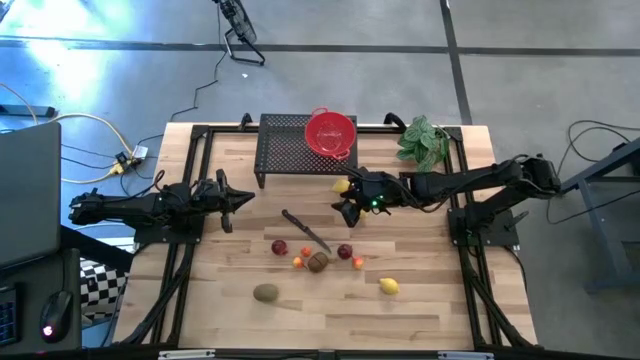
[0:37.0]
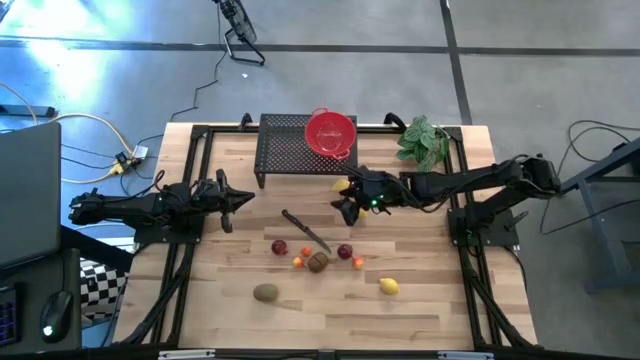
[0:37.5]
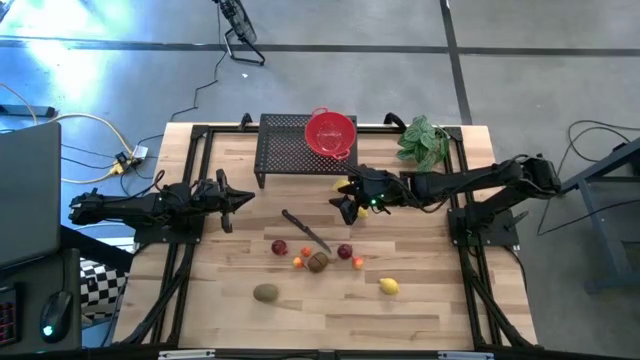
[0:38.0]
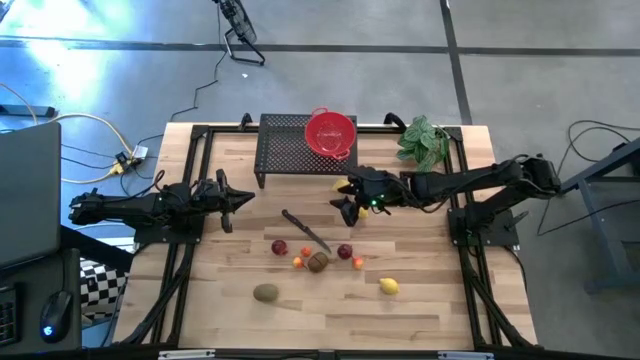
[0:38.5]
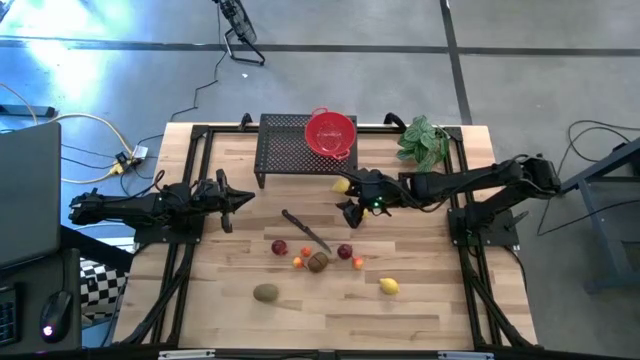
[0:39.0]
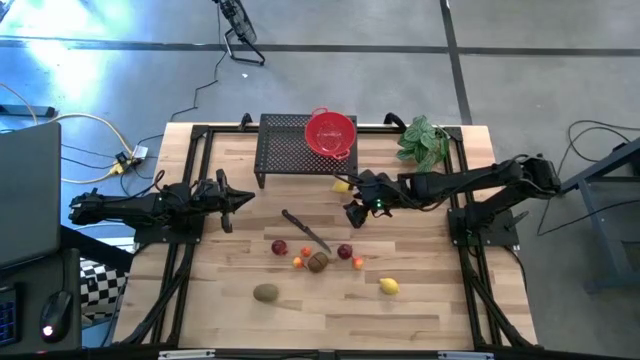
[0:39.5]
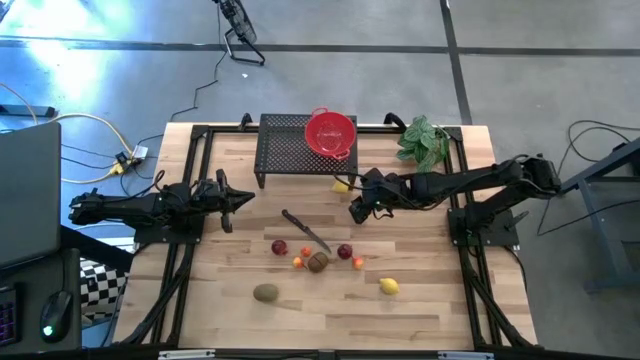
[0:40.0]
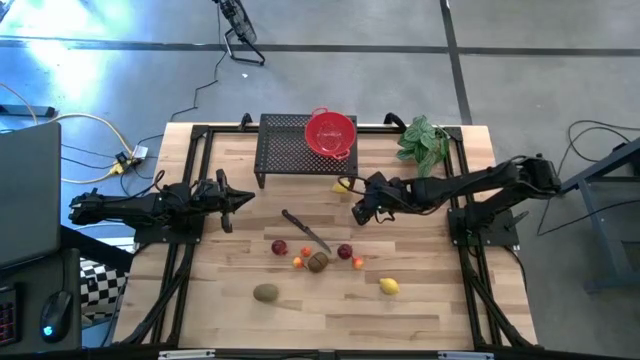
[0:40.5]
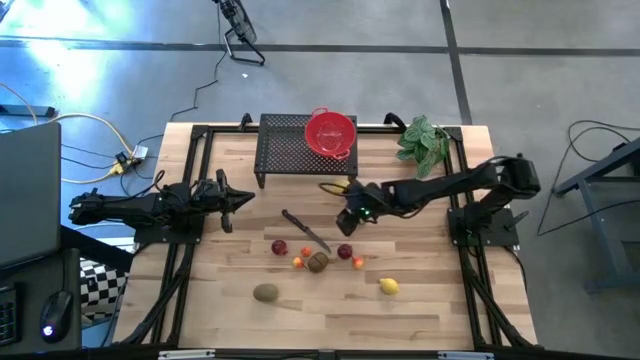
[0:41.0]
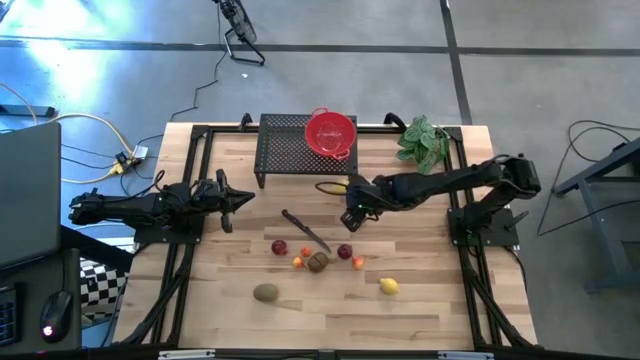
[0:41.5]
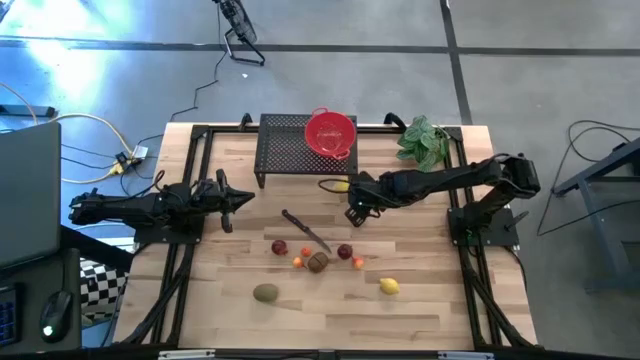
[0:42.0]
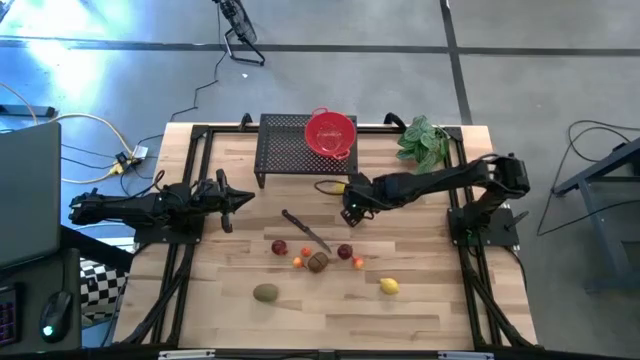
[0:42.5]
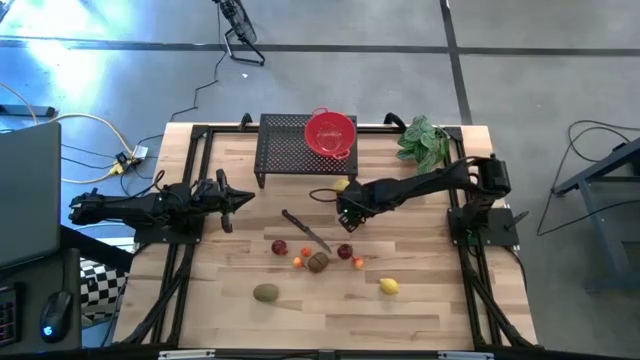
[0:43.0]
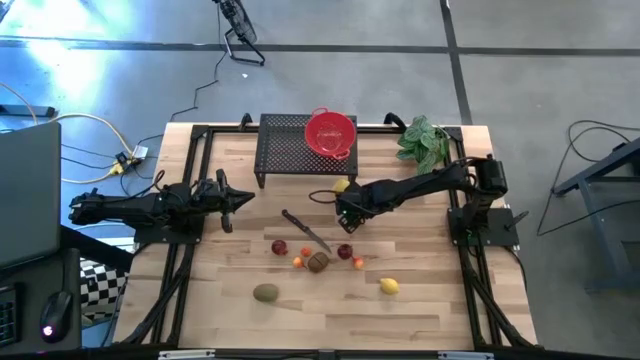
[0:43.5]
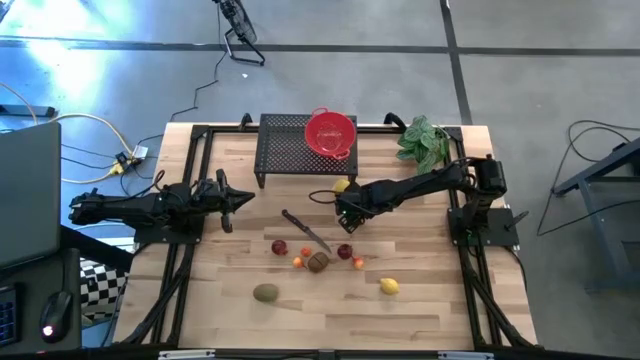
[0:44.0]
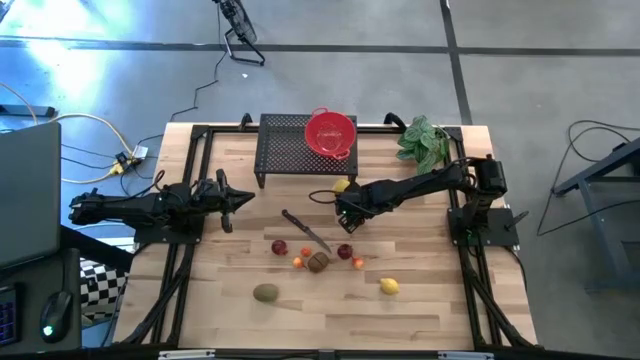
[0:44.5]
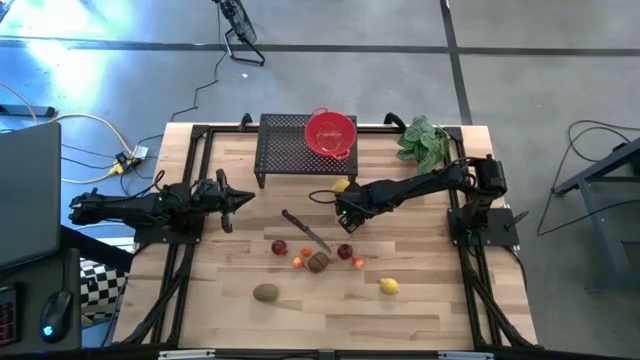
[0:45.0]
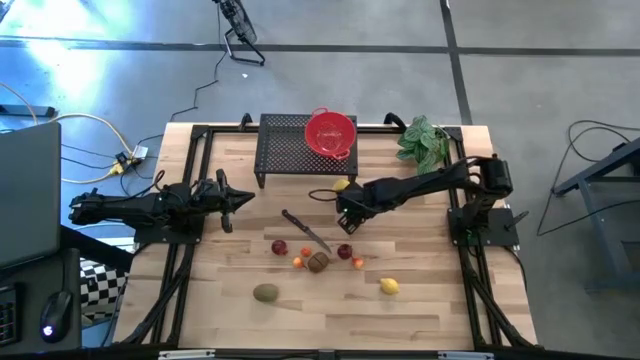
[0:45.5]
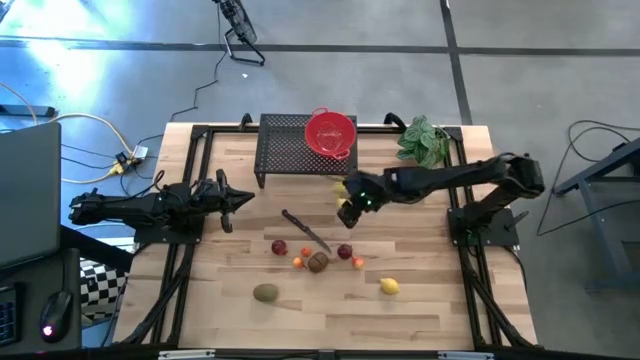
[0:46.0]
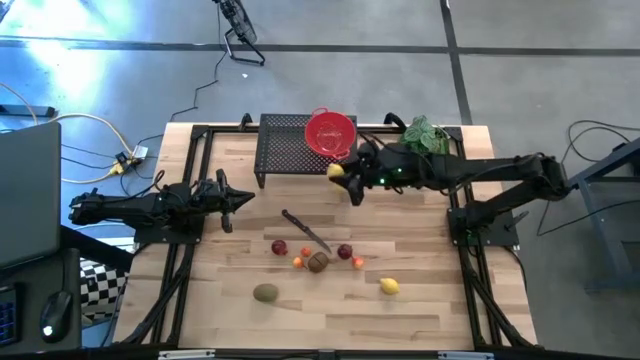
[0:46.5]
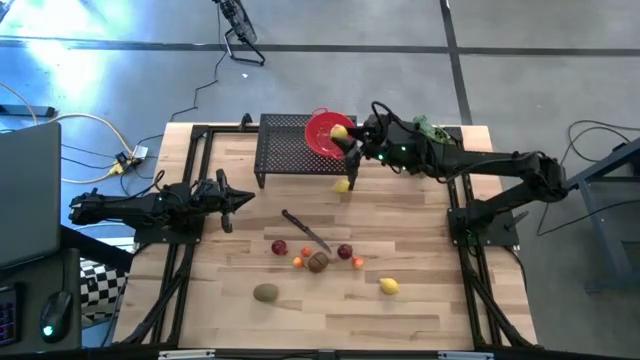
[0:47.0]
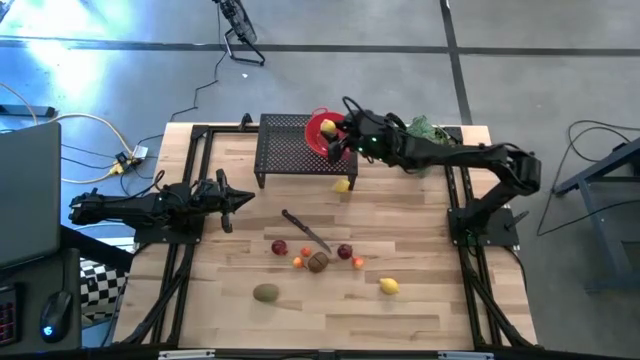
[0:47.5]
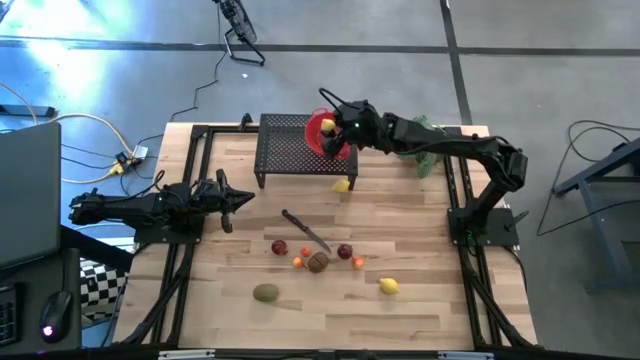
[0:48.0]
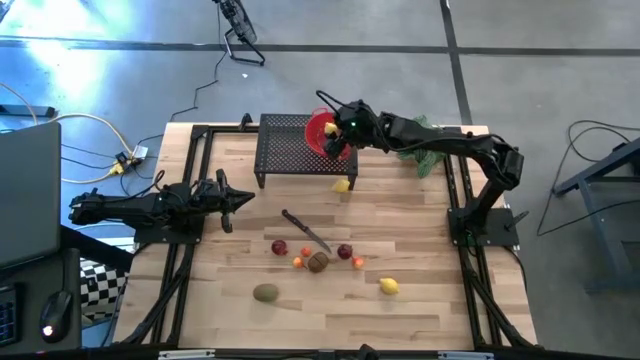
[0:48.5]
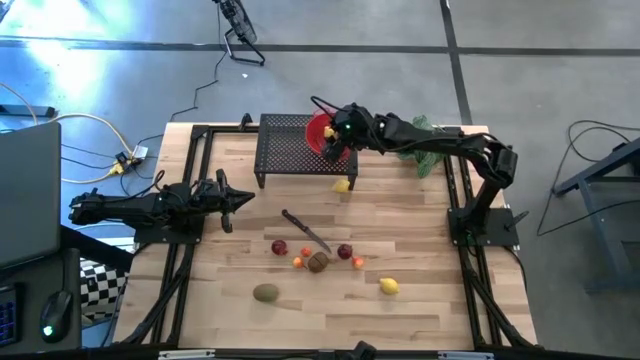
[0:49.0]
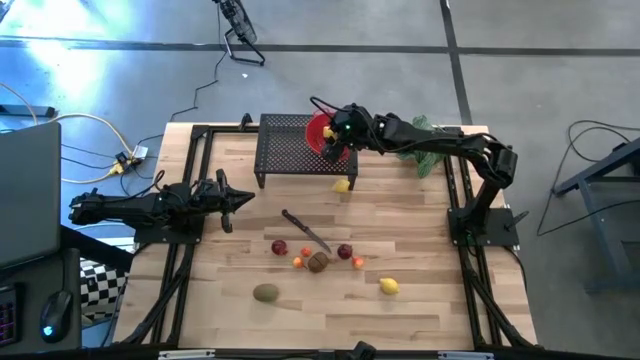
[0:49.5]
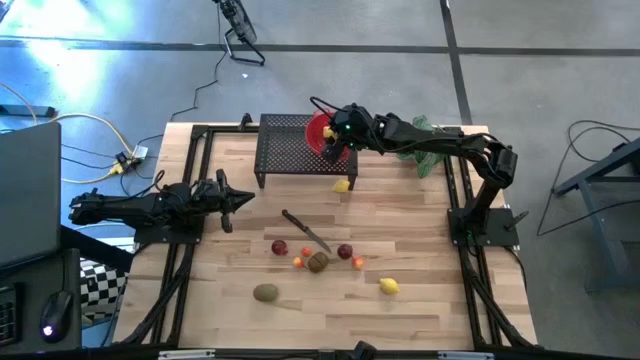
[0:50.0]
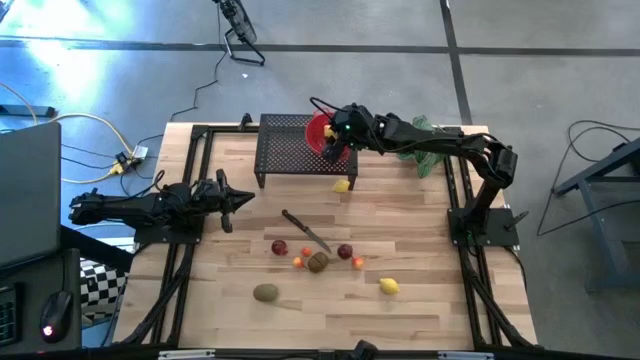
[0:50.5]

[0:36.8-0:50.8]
Task: Pick & Place Fruit
Put the middle lemon into the colander on the shelf on the shelf

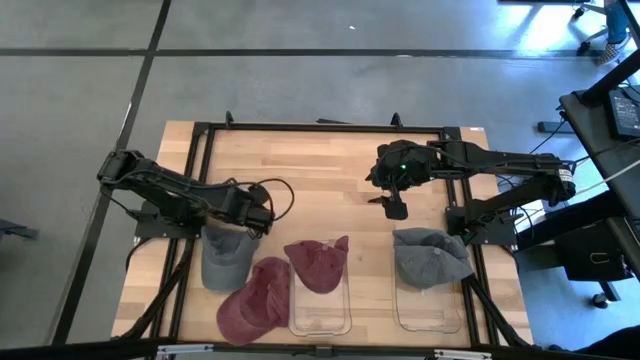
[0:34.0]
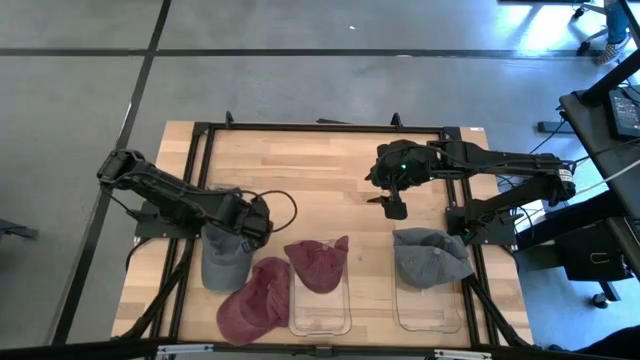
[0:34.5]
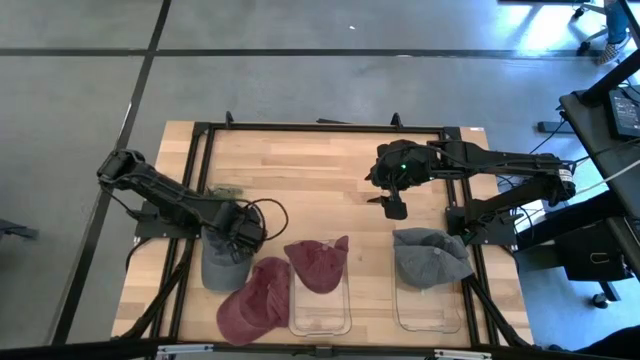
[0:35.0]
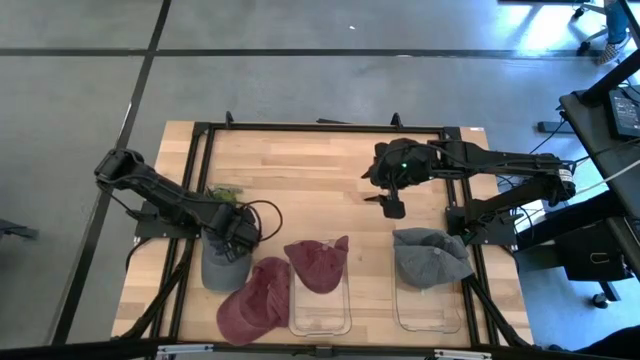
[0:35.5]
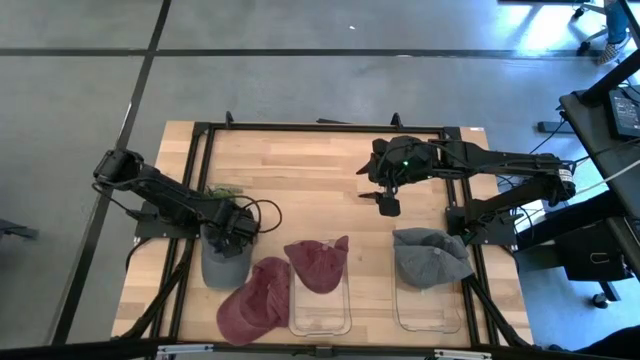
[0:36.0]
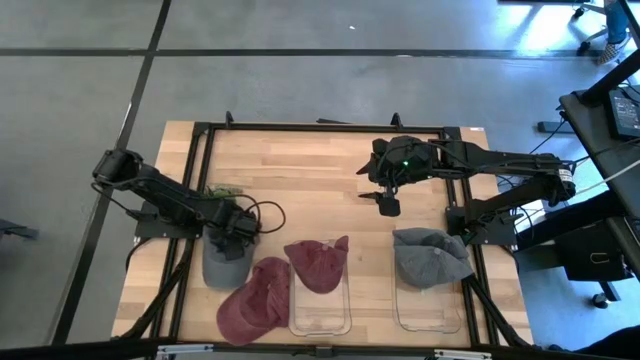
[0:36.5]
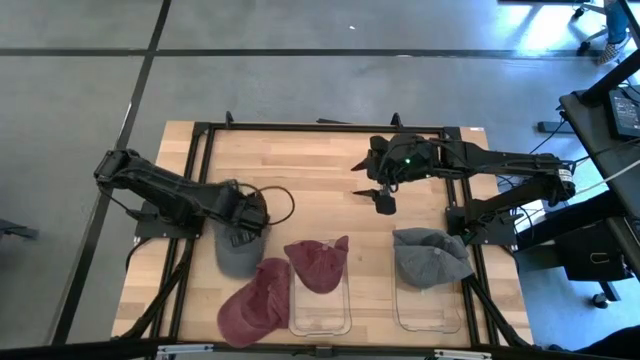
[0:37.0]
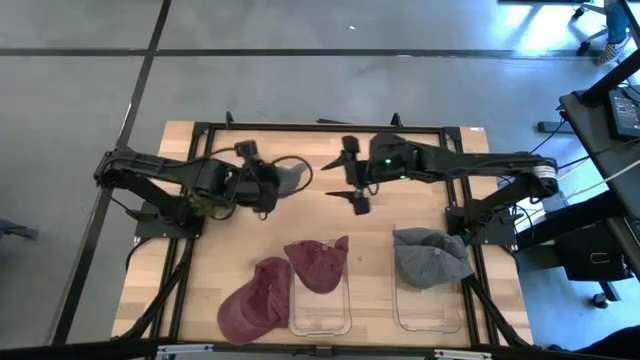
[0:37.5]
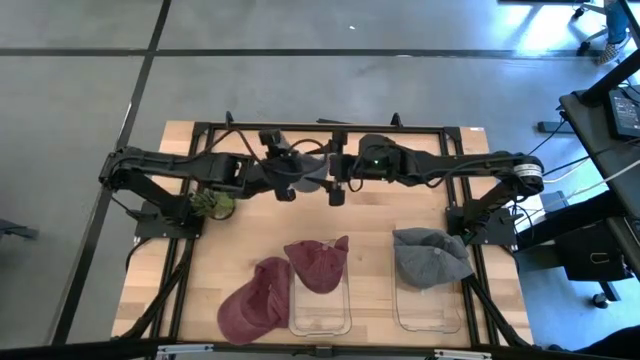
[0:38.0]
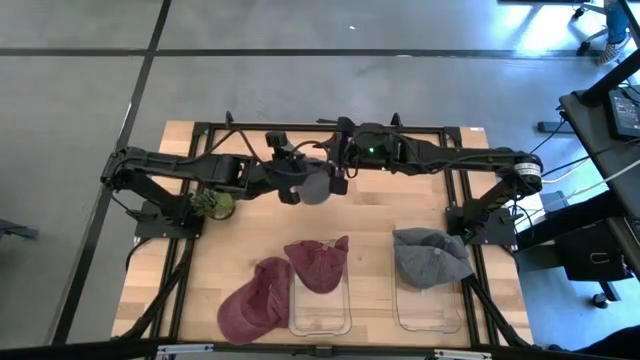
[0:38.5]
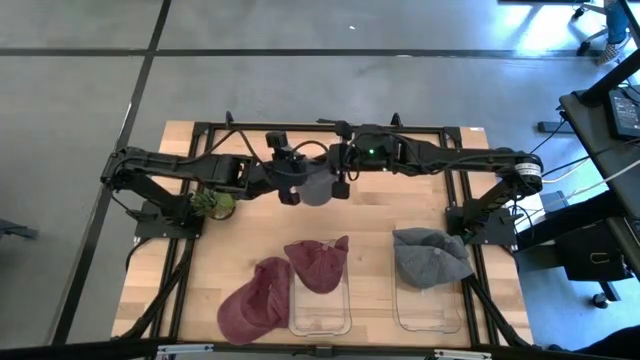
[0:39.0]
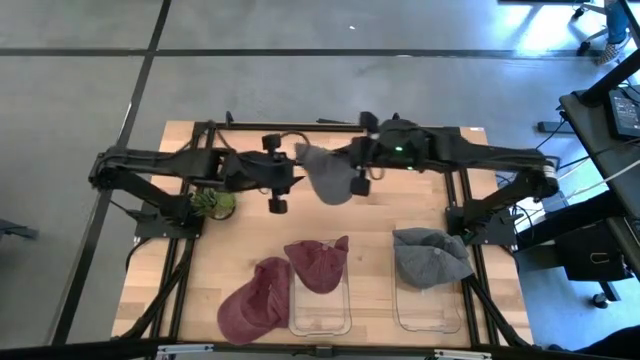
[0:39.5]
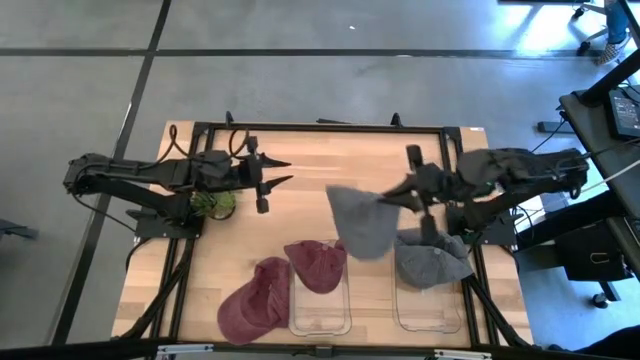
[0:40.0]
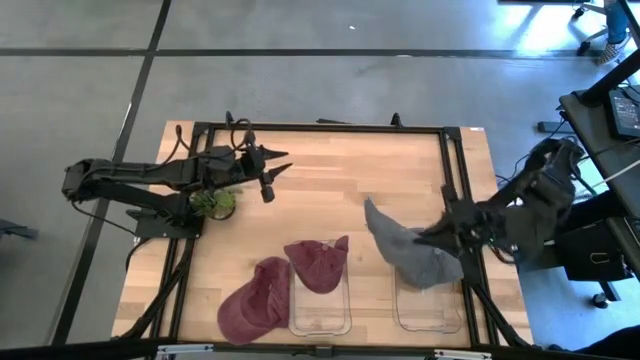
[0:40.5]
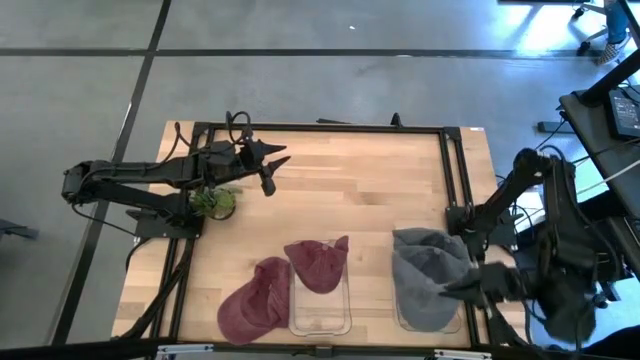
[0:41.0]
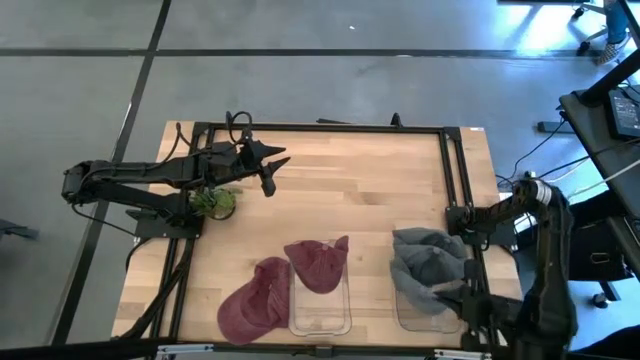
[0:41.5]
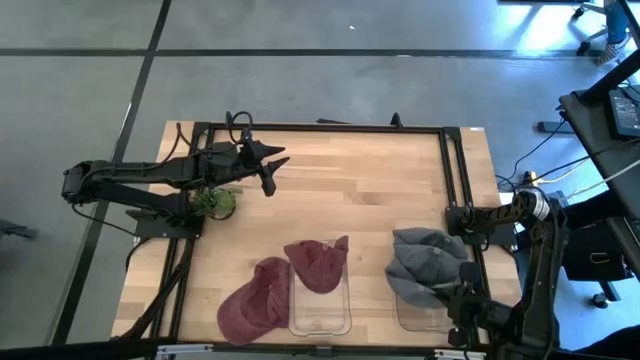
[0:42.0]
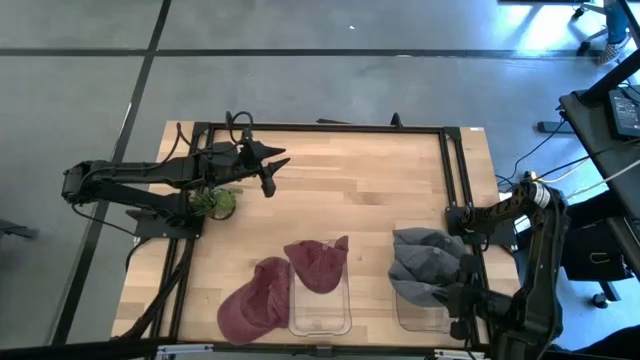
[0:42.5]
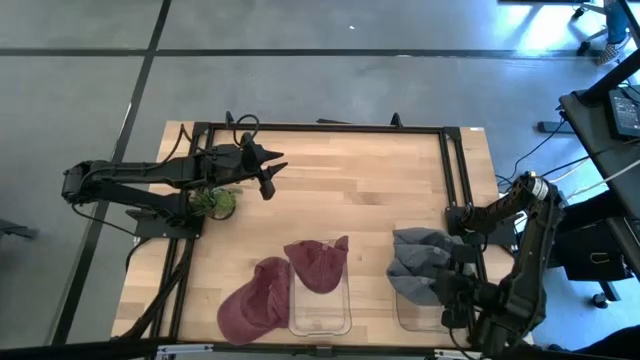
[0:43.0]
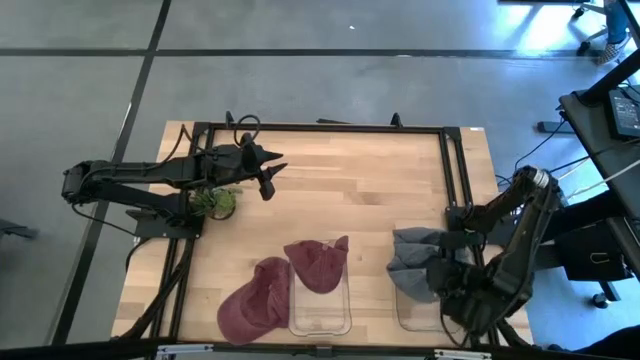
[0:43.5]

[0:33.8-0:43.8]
Task: Pick & Place hat
Put the gray cap into the right transparent bin
